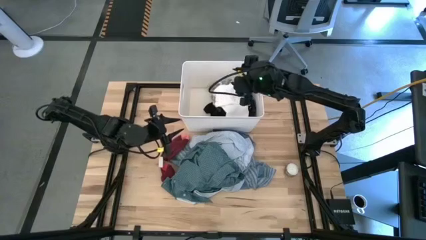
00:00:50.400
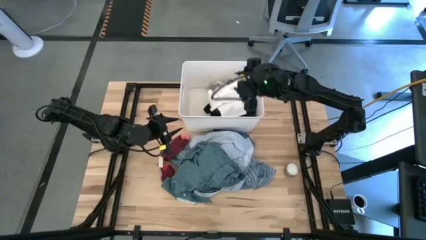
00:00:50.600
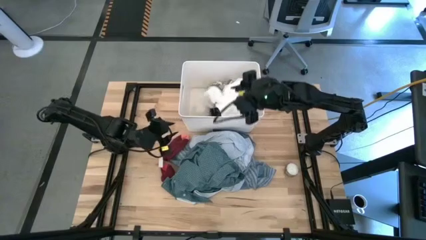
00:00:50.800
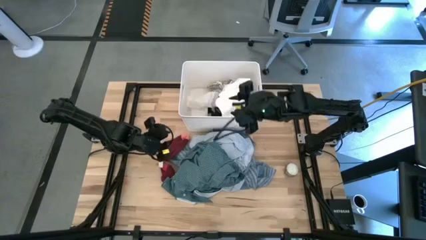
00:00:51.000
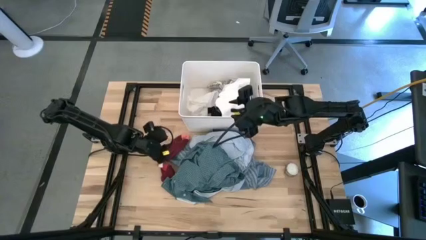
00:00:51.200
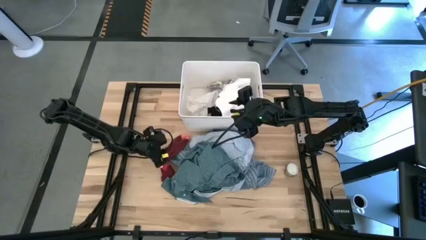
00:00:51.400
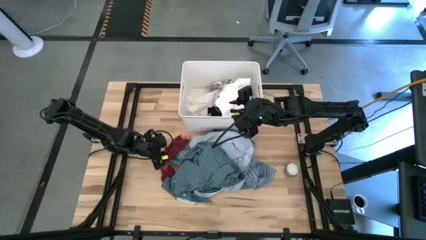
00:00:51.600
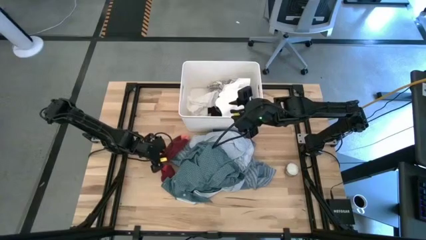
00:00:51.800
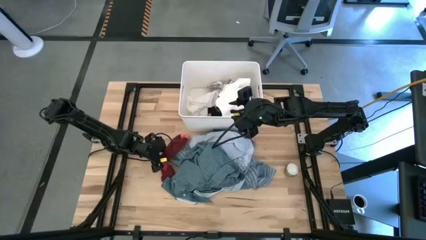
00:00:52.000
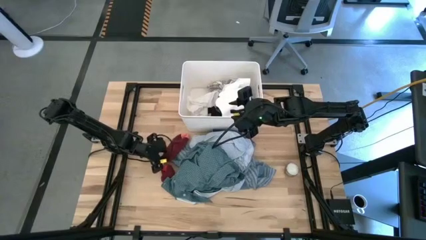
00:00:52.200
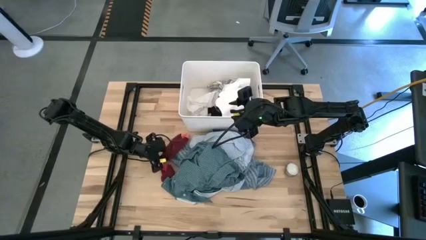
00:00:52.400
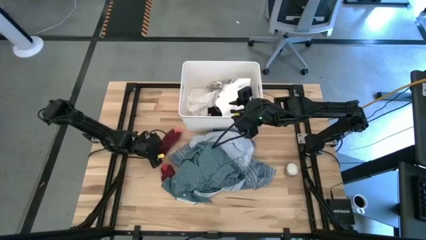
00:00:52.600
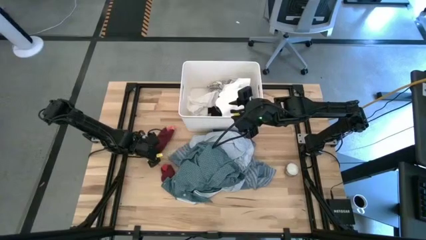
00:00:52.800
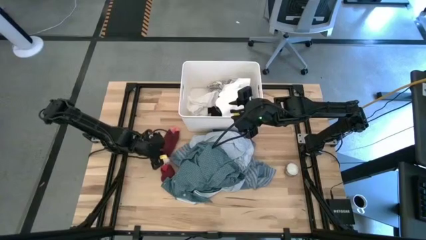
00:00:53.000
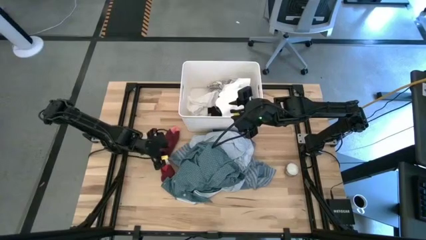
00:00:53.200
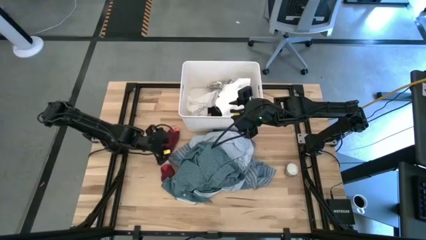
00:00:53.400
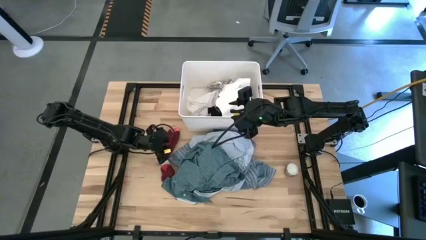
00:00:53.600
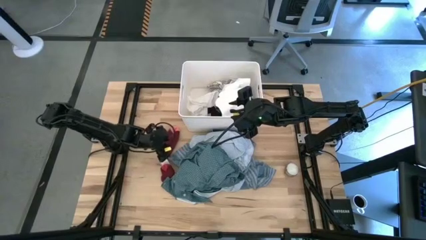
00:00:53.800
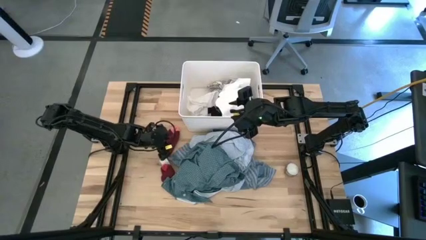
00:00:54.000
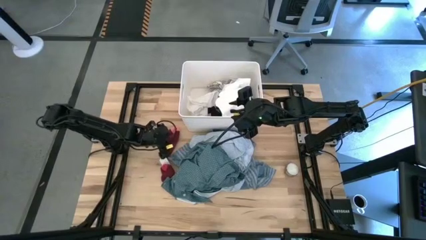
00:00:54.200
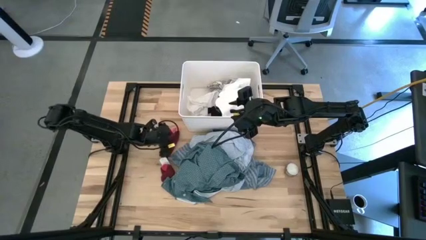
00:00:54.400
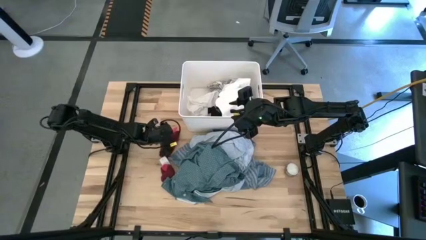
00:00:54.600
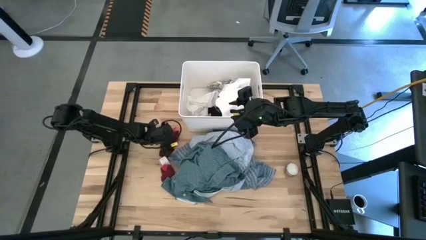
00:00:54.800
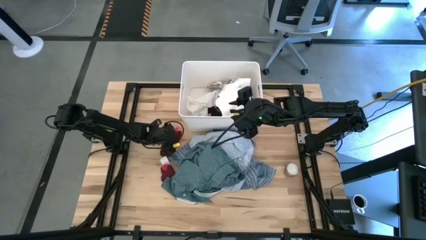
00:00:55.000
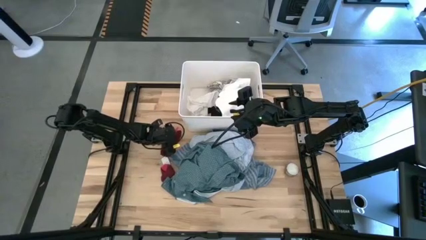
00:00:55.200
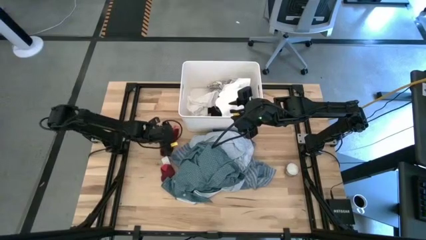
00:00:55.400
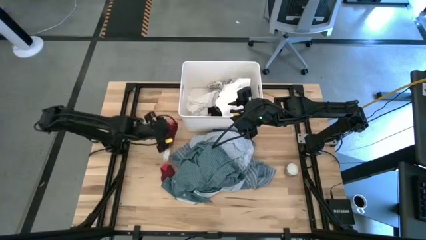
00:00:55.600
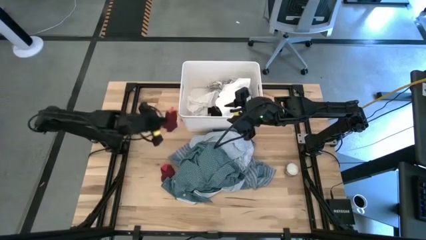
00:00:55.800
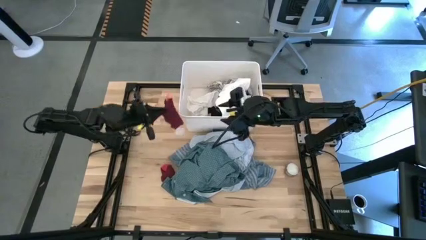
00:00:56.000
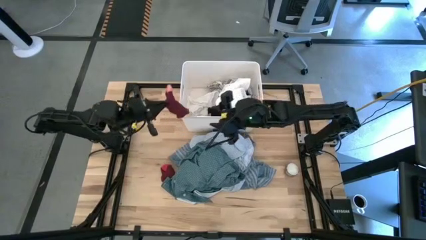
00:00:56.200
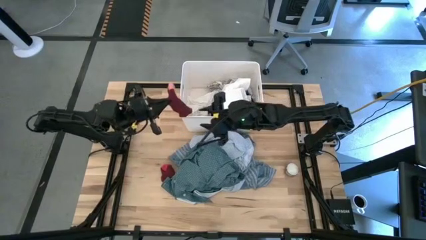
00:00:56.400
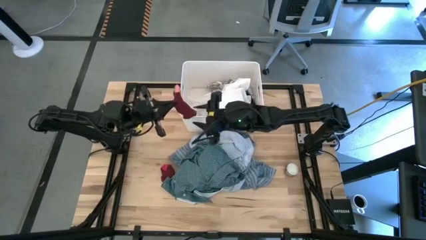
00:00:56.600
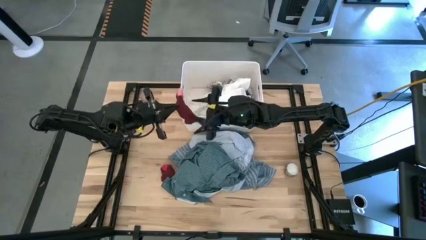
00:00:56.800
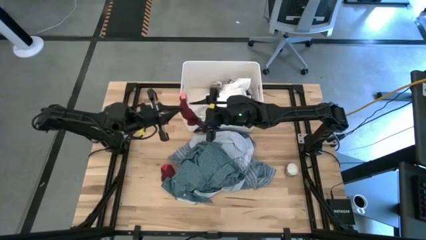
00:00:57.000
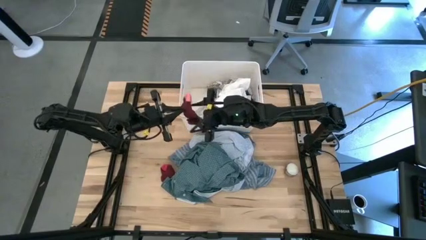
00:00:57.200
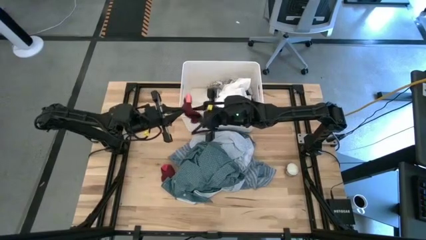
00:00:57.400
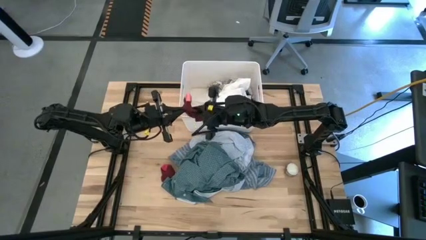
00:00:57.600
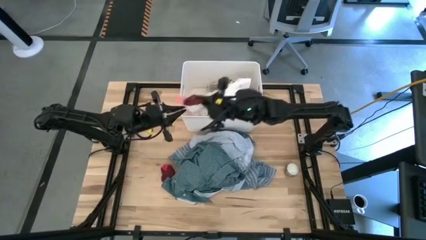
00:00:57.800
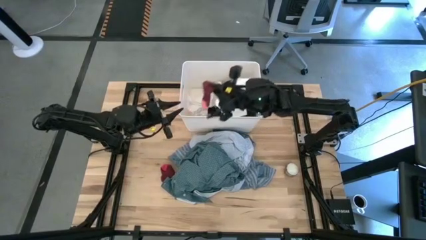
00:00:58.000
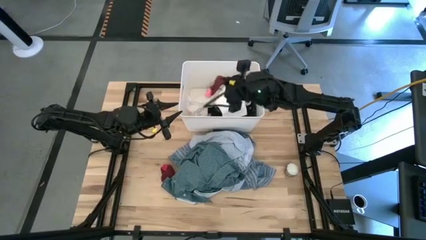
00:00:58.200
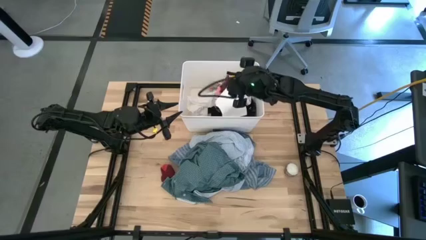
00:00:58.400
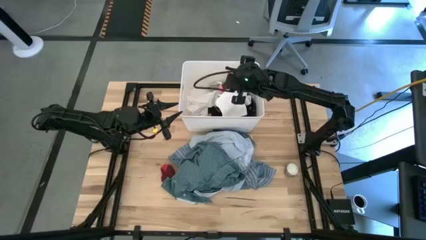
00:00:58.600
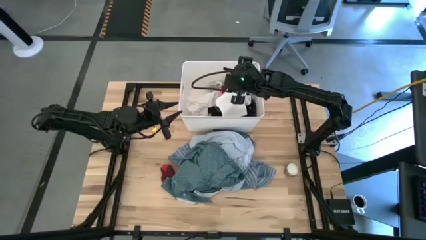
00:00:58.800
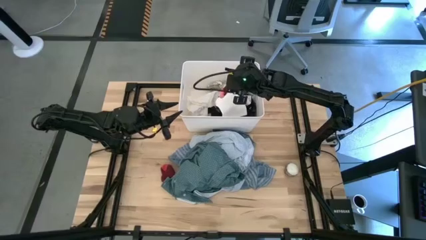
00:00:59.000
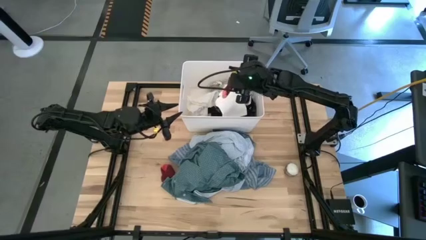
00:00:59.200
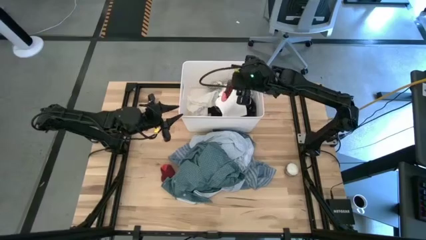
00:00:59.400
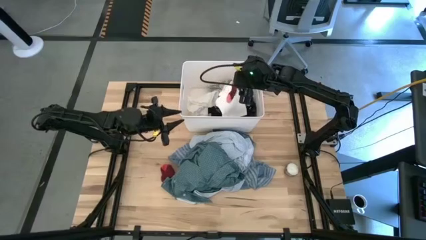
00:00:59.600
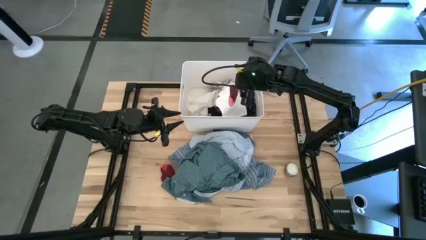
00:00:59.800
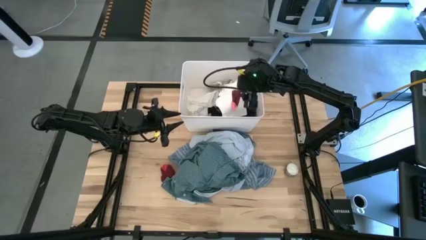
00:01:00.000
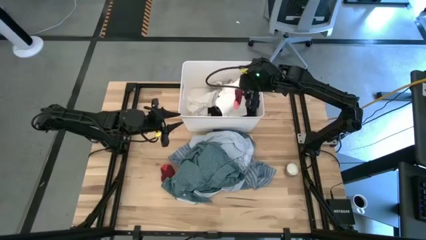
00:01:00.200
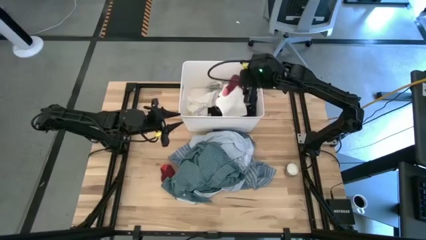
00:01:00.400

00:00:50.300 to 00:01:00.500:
Task: Sort clothes
Put the top red sock into the white bin

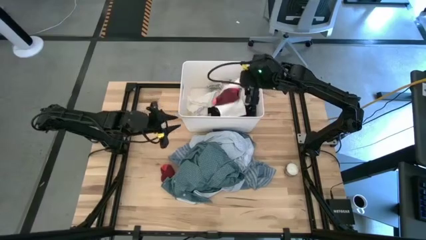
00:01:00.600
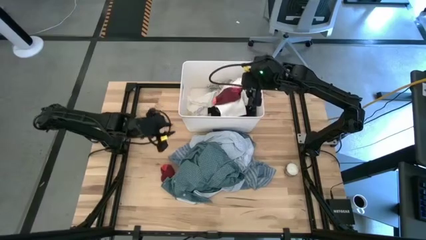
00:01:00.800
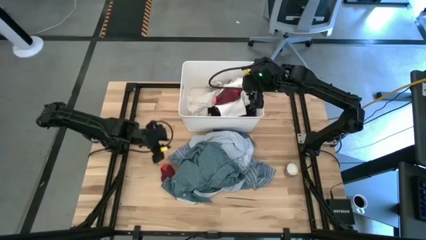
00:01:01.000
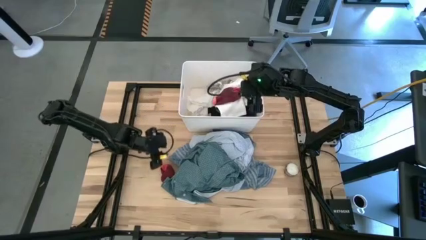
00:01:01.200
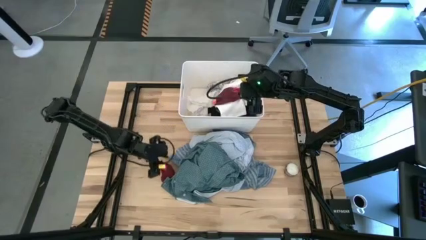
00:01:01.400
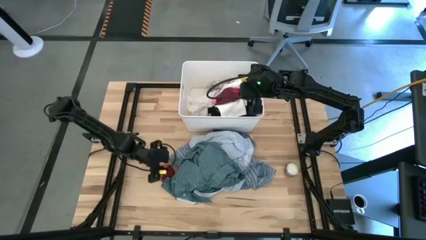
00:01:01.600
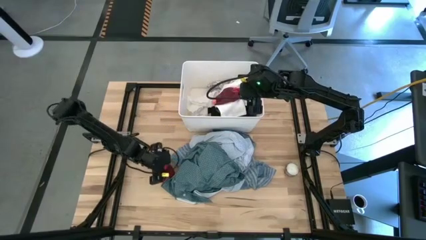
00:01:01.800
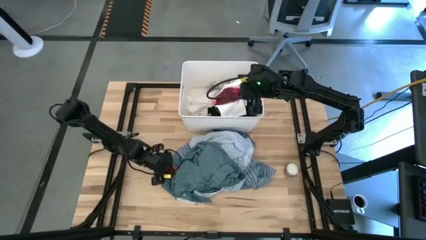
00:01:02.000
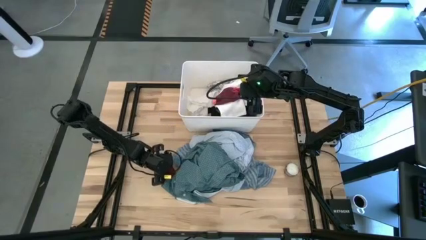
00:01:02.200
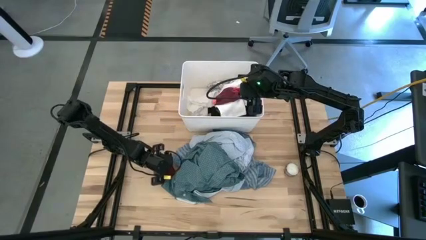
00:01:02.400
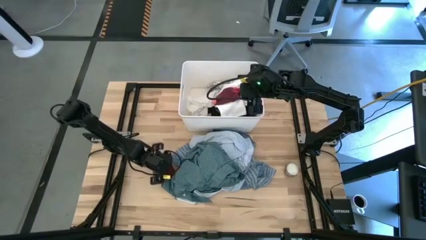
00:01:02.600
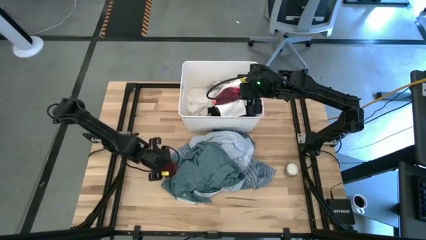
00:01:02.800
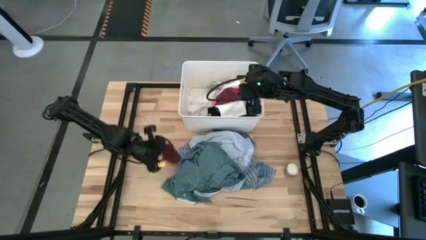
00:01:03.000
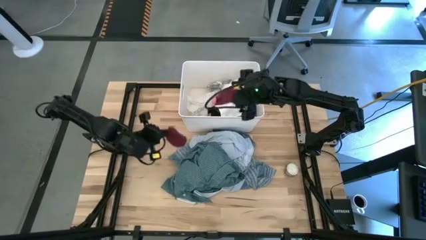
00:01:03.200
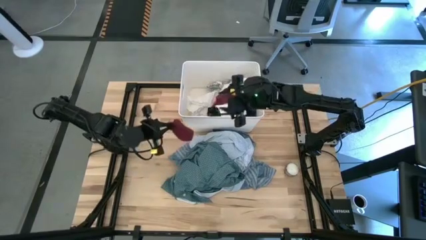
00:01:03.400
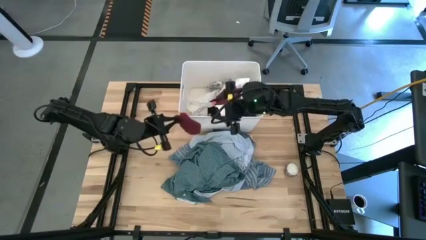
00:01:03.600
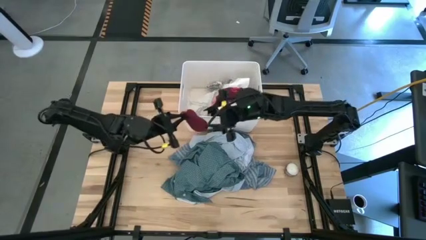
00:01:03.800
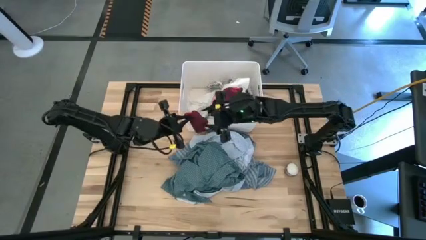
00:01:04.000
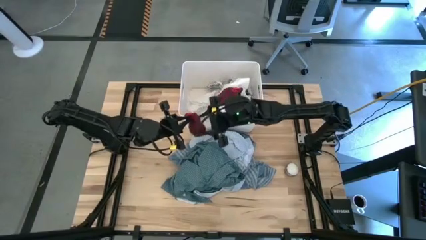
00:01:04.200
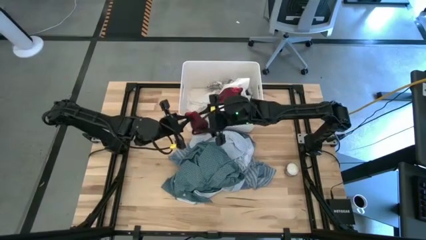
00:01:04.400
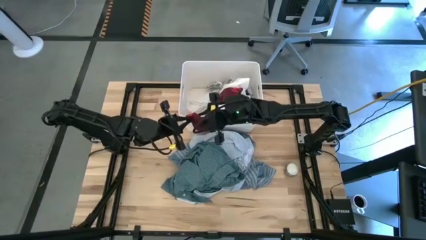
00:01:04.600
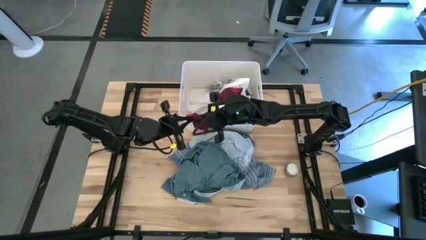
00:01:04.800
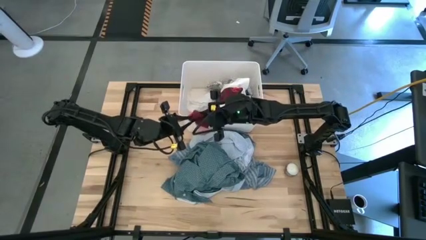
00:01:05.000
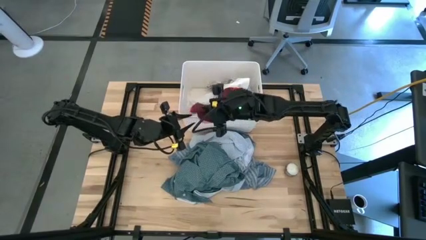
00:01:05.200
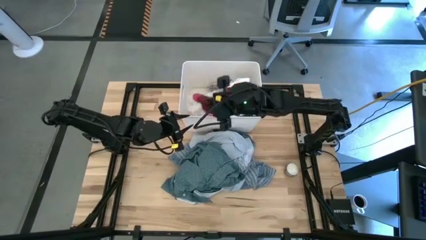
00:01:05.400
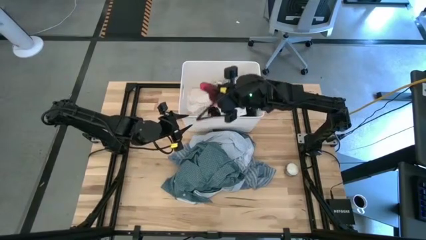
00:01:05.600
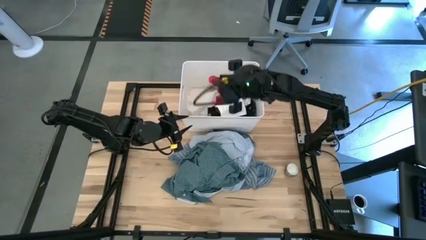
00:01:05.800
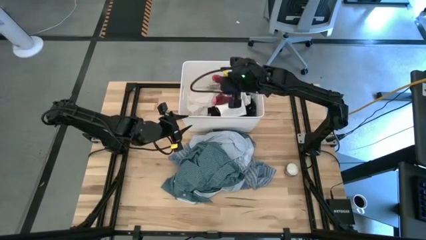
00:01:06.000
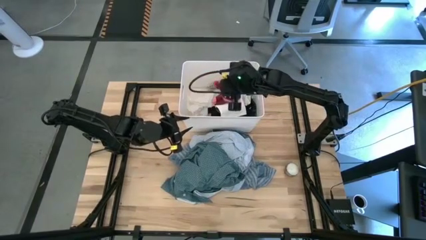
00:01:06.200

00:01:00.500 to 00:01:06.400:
Put the red sock into the white bin

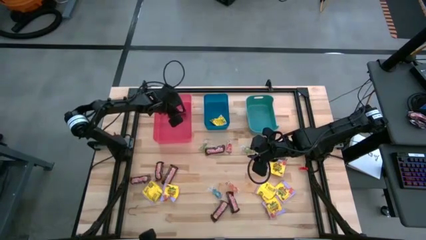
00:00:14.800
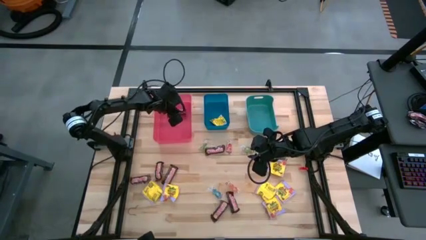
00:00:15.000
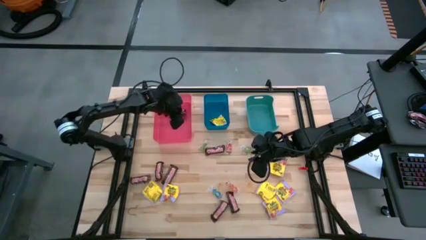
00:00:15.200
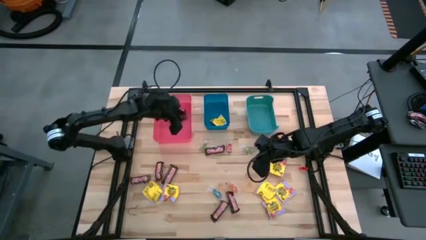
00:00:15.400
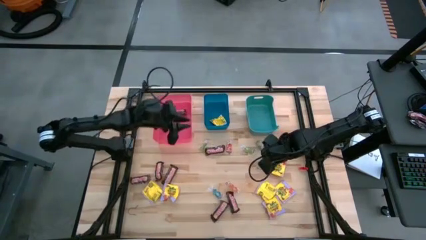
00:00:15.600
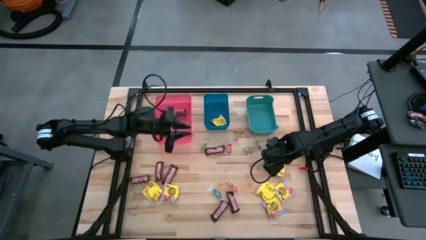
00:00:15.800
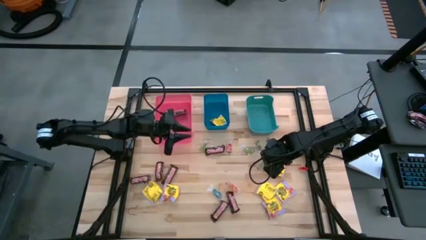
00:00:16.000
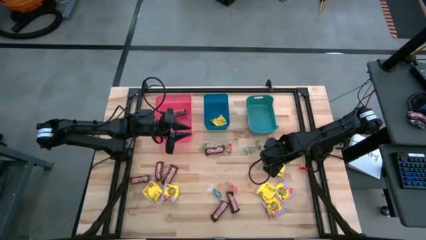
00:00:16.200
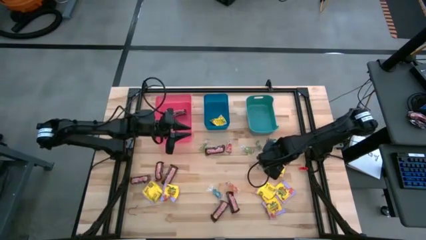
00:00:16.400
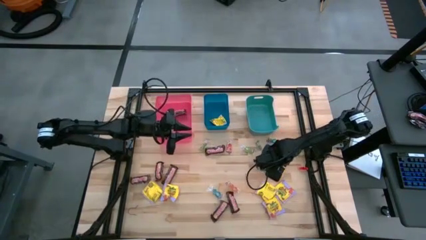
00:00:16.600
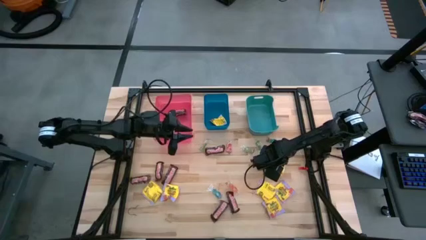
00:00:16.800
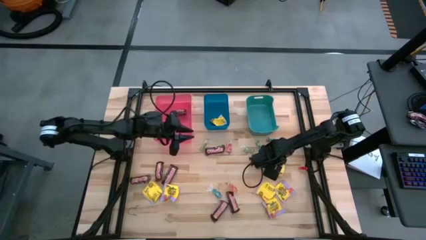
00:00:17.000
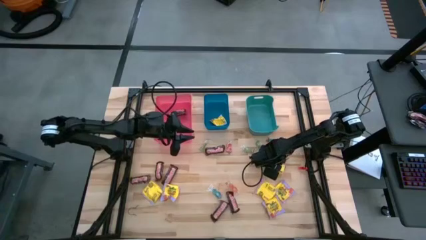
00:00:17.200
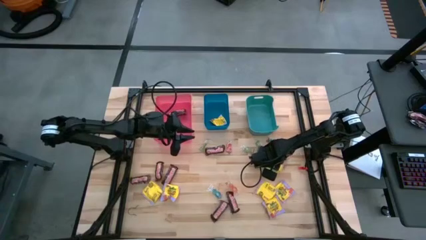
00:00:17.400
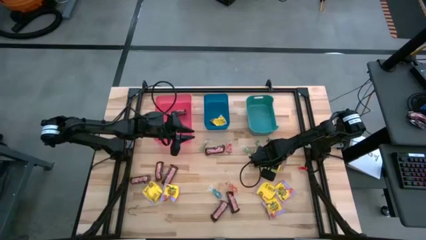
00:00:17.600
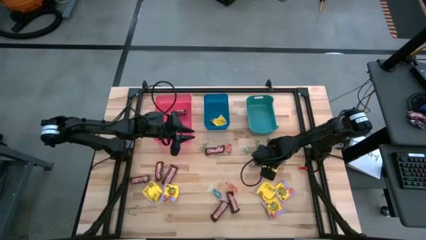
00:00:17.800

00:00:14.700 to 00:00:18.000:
Task: Sort candy
Put the yellow candy into the blue bin
